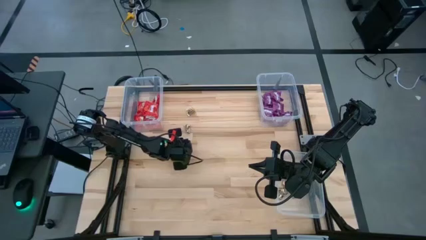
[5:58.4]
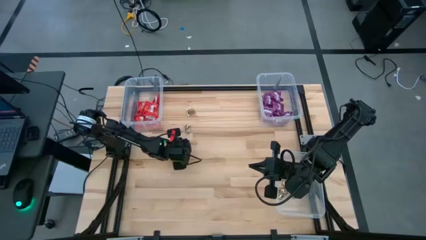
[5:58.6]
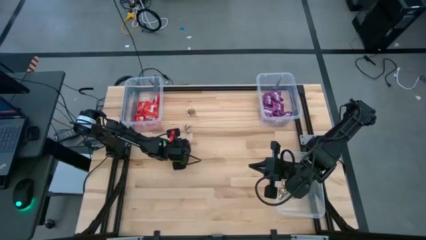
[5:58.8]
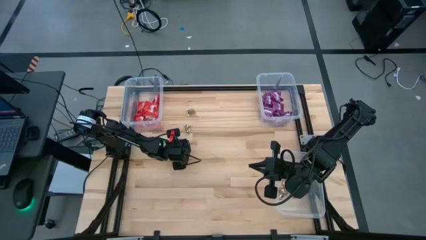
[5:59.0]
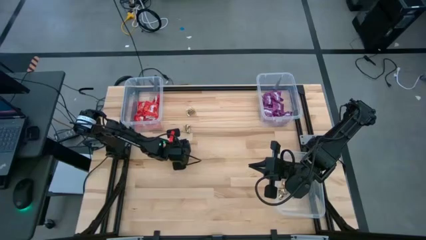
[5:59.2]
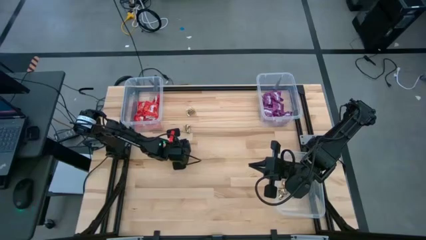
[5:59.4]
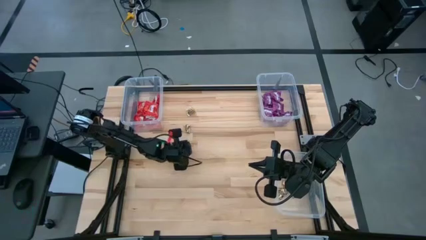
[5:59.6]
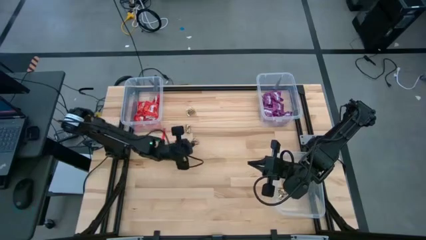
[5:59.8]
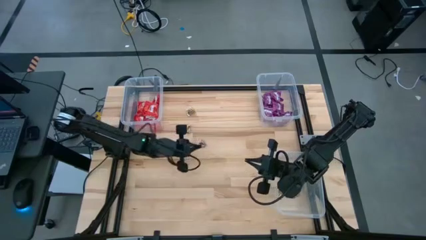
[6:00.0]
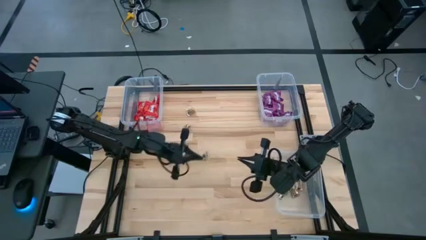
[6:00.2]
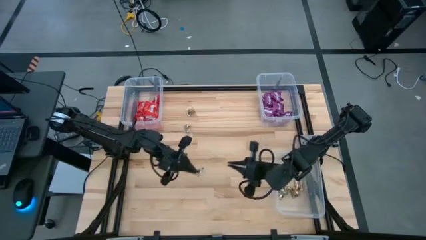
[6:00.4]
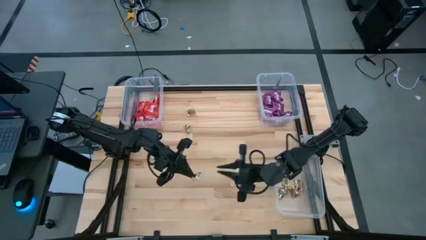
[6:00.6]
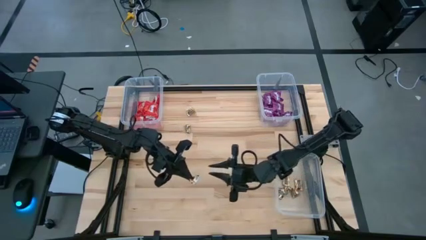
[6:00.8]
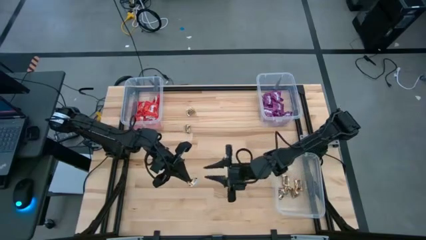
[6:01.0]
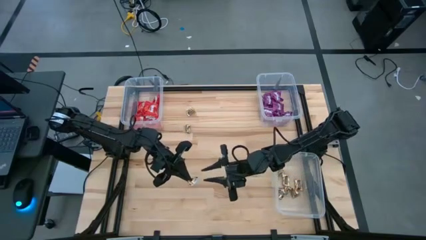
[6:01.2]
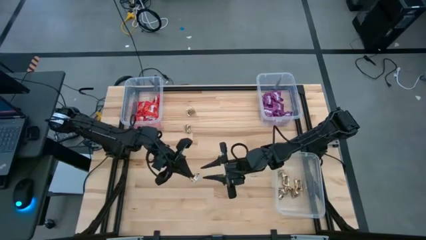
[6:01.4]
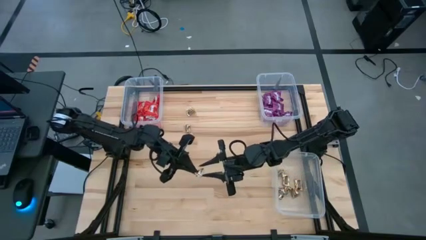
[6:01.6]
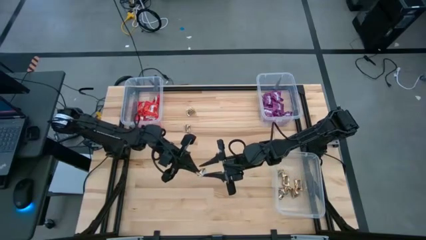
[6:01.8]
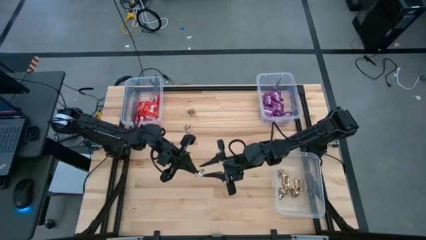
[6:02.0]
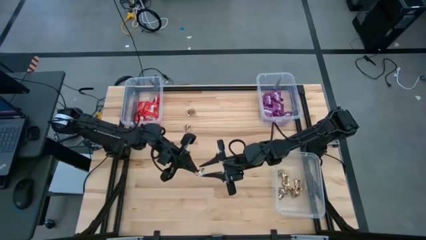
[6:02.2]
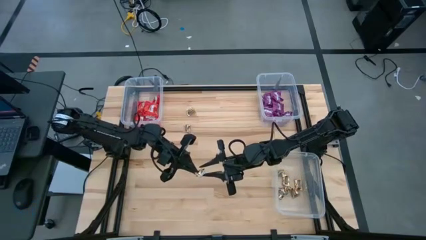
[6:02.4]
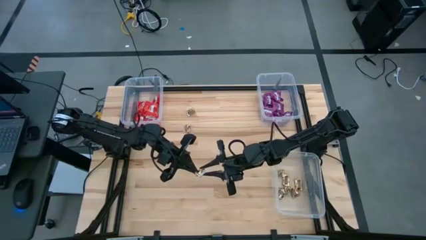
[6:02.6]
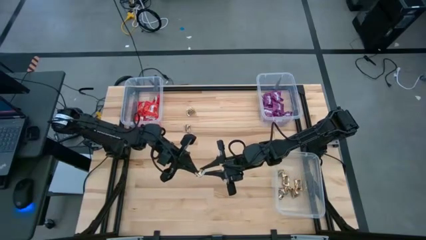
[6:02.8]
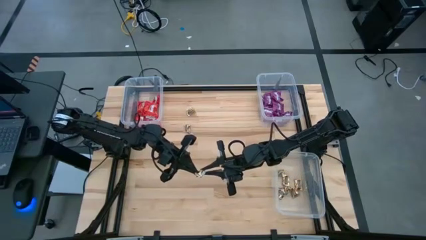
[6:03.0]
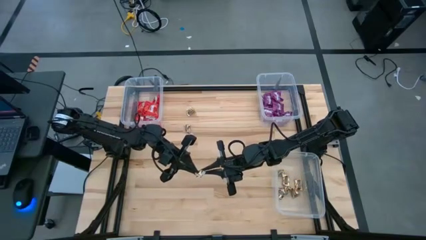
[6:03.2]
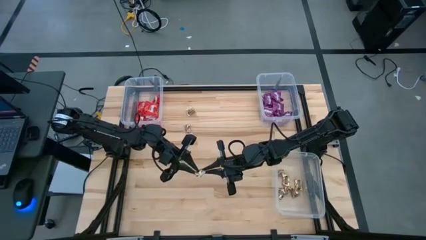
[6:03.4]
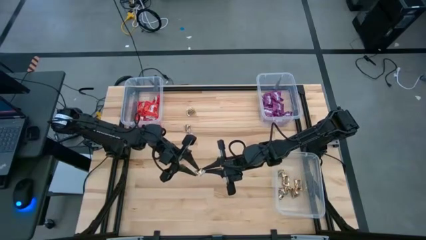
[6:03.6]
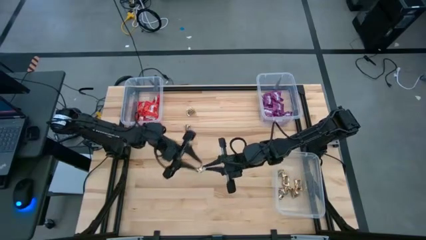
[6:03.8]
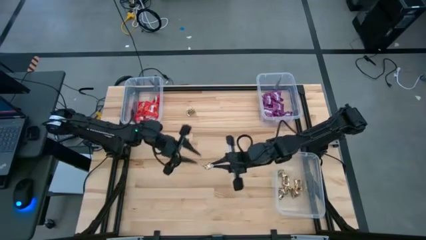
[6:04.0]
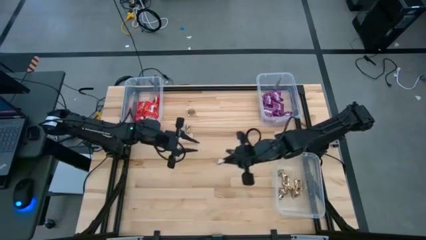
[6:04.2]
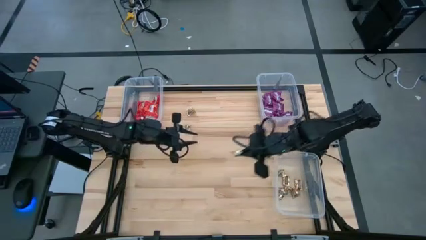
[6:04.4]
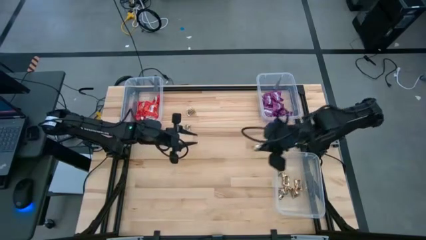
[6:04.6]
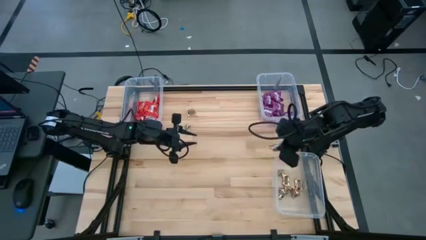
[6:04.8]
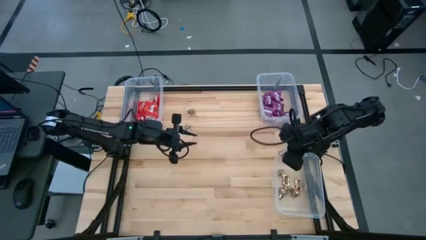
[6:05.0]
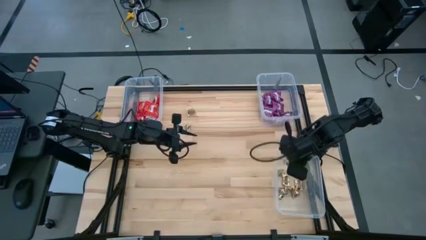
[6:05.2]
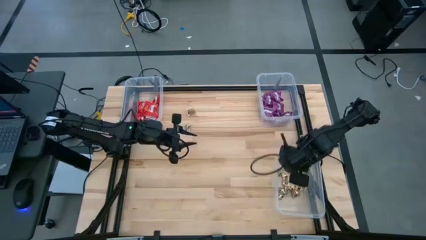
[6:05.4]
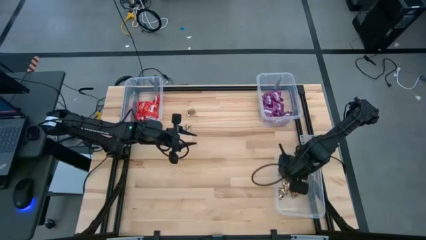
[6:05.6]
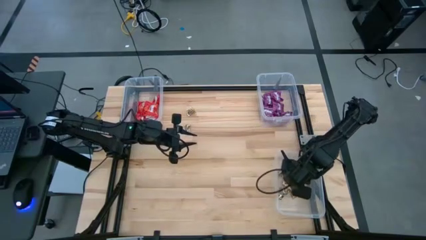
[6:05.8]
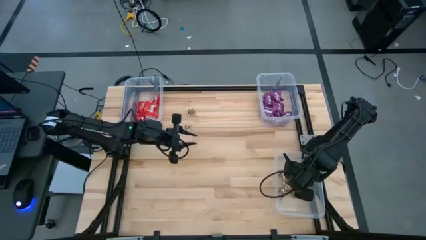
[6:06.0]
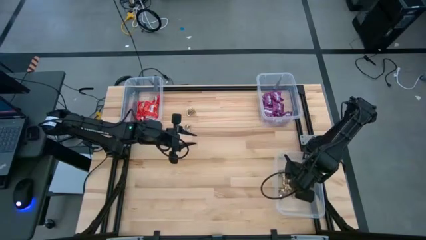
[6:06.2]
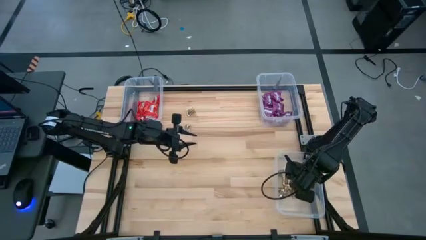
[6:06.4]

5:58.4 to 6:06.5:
Task: Sort candy
Put the yellow candy into the bottom right transparent bin

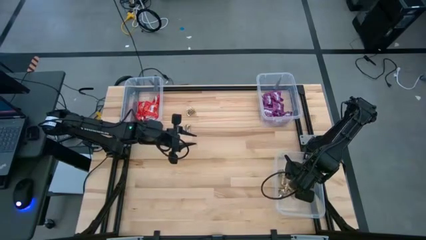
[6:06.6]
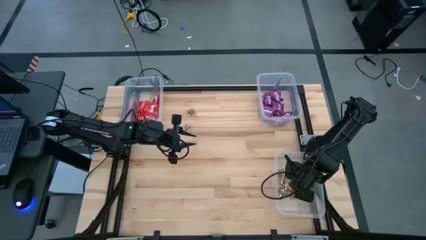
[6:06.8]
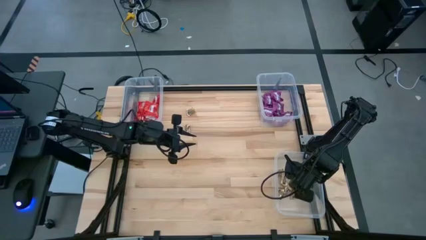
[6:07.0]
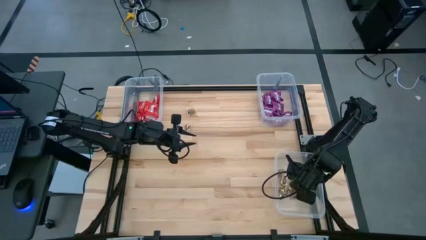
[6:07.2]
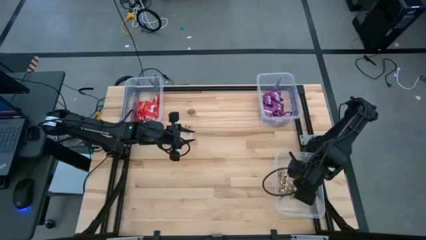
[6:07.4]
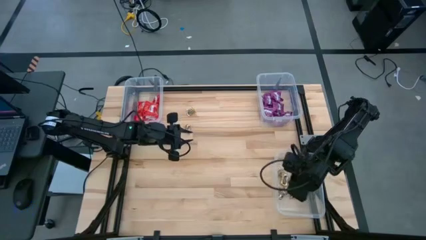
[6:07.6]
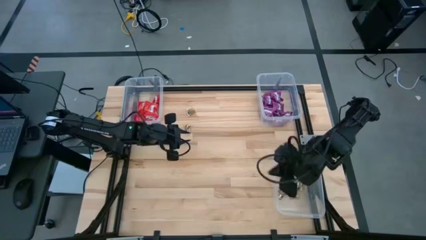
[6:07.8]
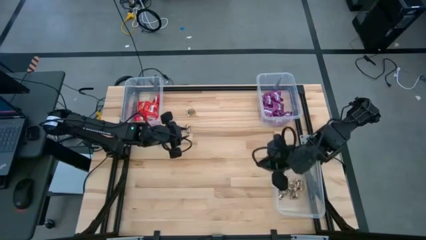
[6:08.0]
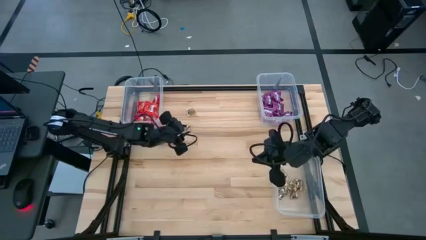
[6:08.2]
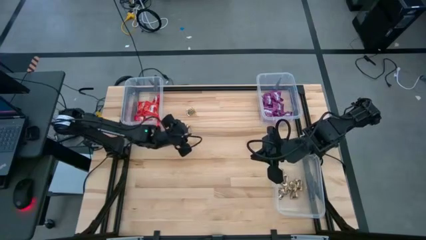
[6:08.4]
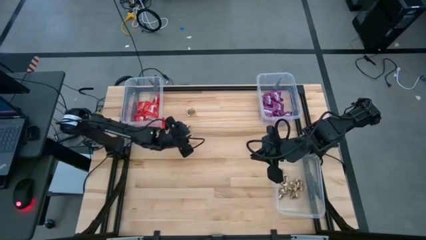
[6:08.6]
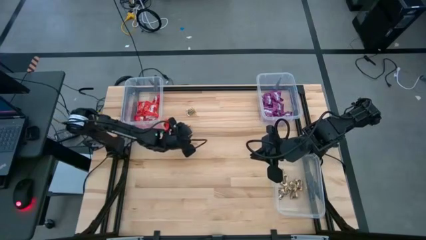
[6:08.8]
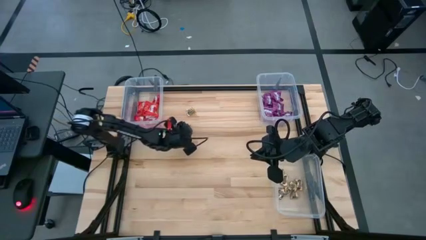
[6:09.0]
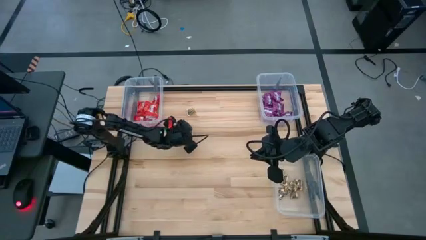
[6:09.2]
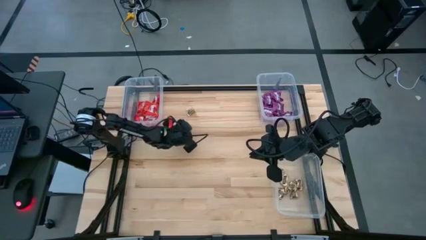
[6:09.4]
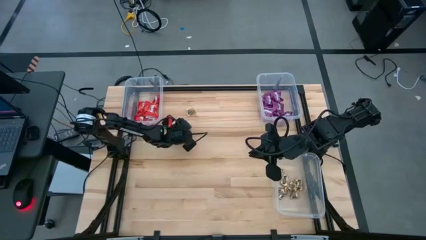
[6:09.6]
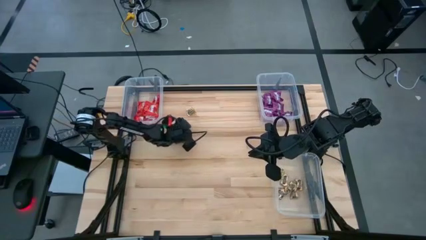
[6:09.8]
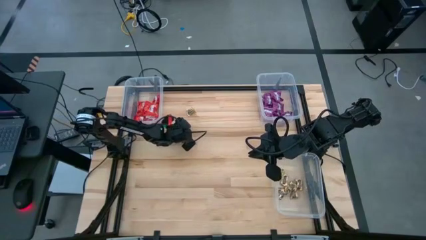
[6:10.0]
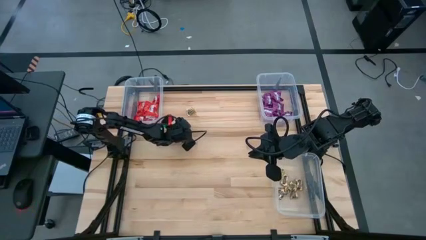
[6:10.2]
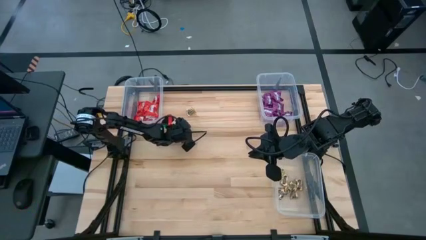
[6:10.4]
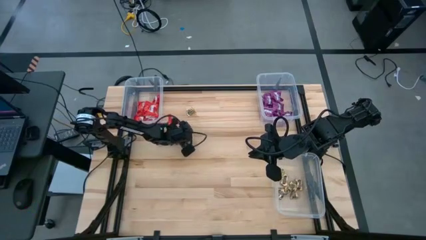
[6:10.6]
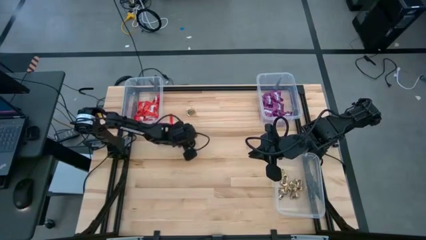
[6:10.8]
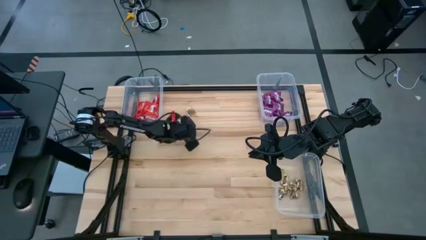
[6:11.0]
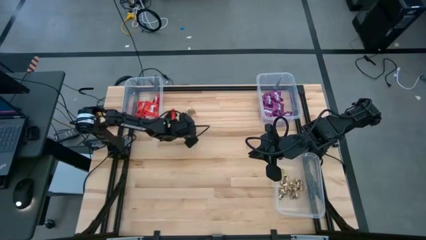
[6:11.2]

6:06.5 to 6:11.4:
Put the yellow candy into the bottom right transparent bin

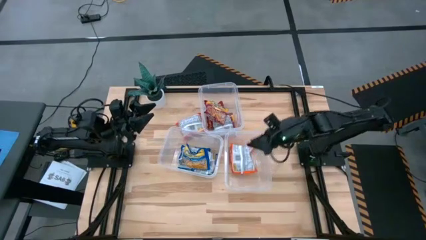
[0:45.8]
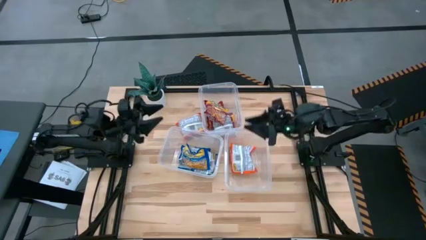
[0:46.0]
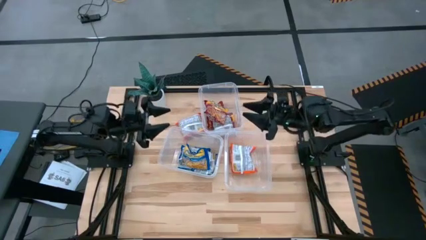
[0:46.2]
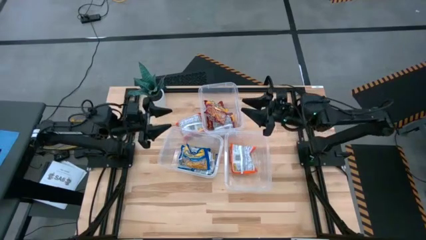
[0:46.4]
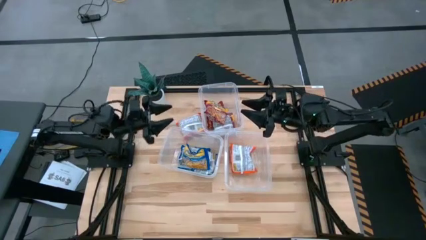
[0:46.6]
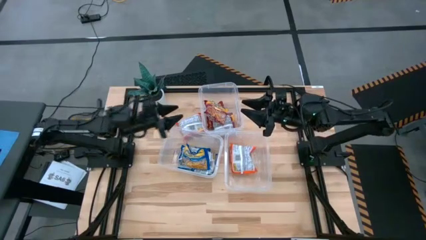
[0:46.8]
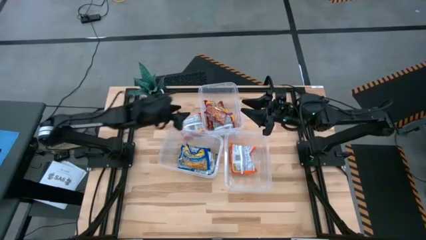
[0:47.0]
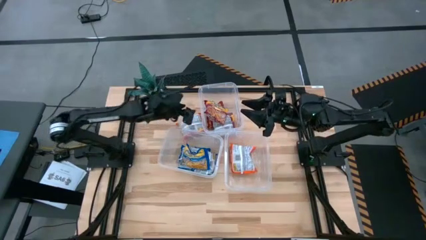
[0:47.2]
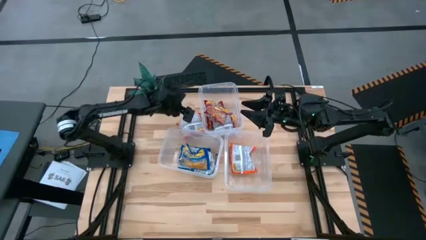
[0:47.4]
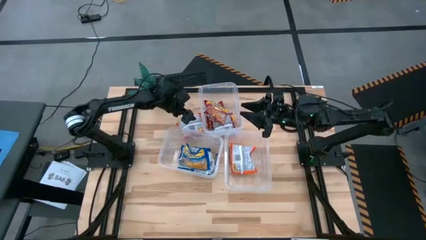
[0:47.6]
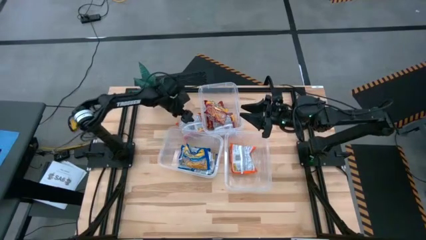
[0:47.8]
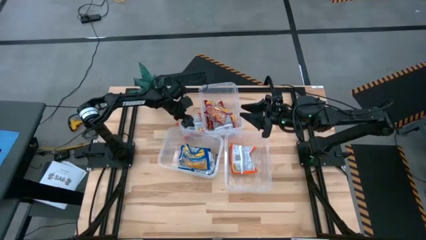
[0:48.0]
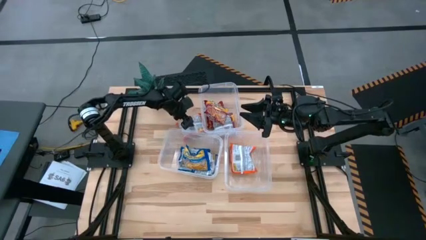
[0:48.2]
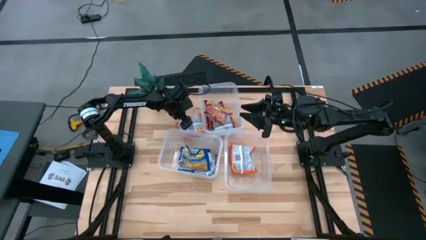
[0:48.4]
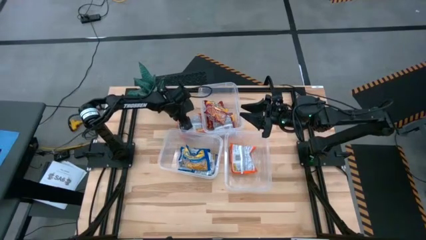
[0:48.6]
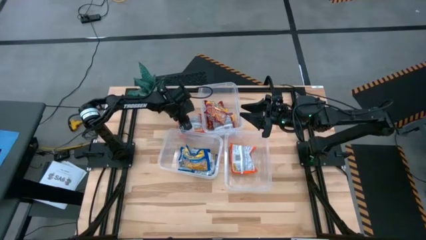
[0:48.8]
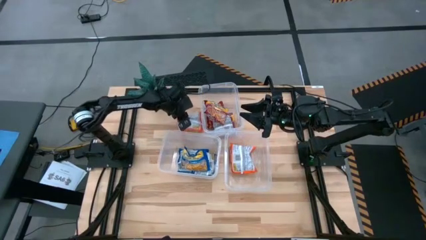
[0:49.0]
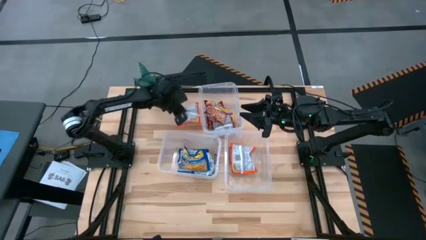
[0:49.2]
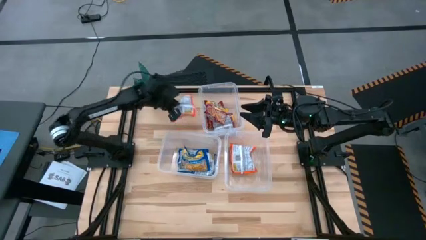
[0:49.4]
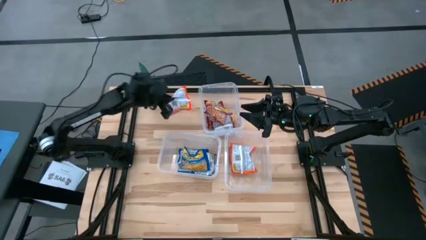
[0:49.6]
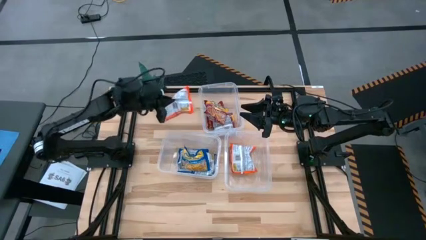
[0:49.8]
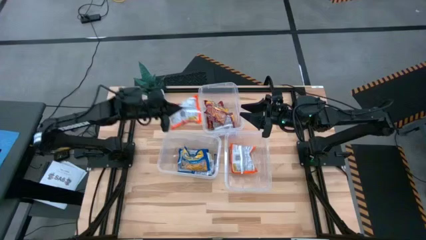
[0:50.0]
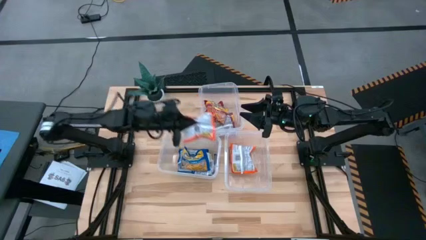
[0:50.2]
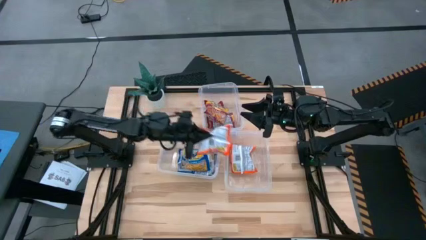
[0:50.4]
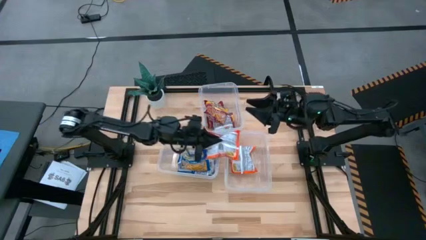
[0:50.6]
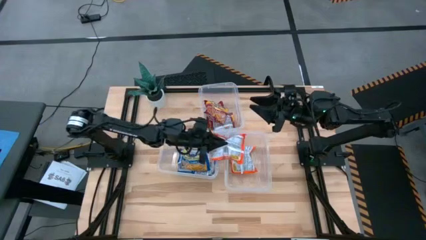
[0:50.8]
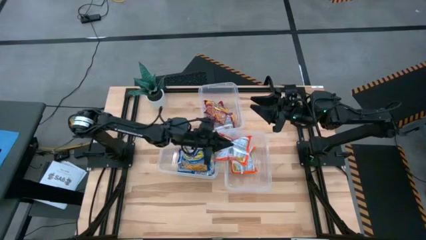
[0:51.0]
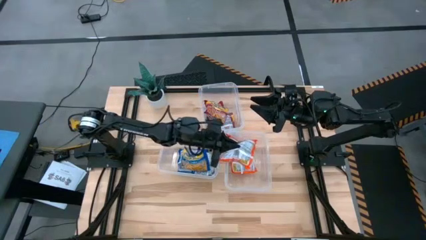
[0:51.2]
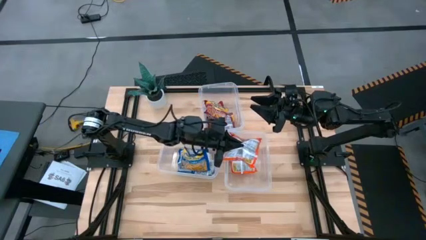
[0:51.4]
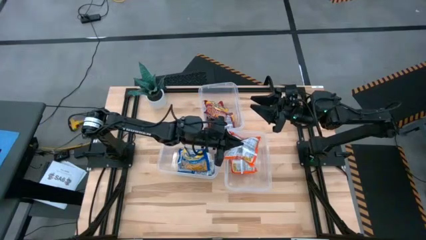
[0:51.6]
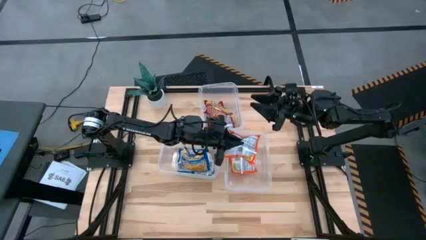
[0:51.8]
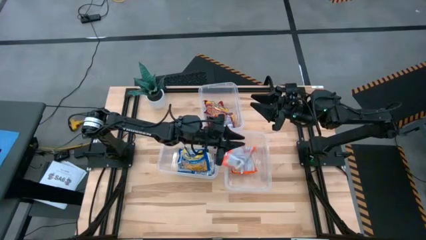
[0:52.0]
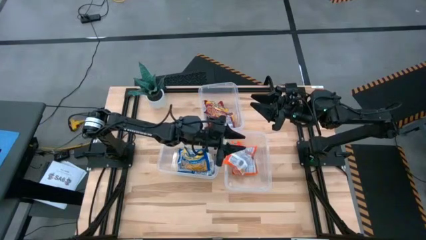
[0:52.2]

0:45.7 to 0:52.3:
Task: Sort Maruchan noodles
Put the orange noodle pack into the bottom right transparent bin
